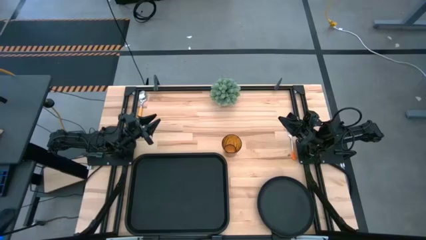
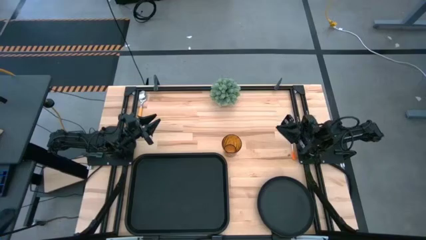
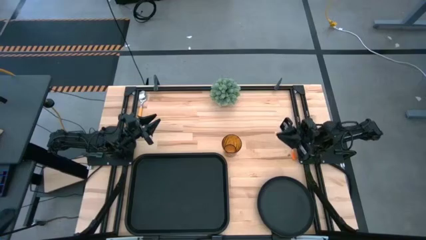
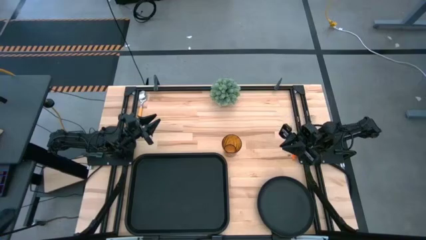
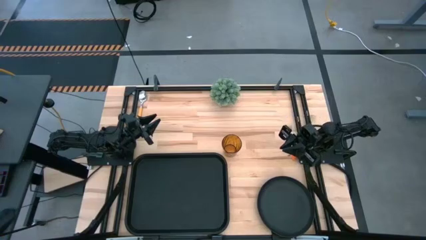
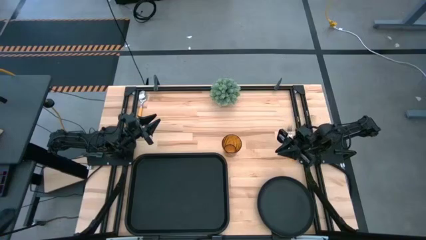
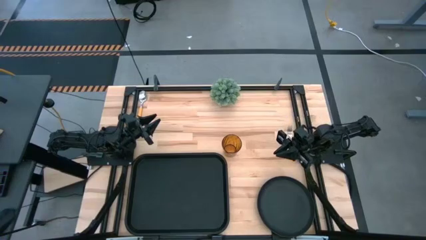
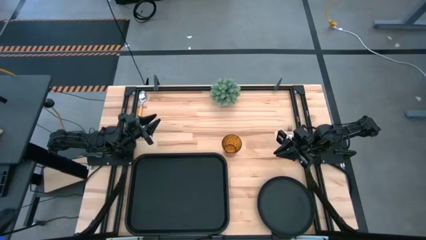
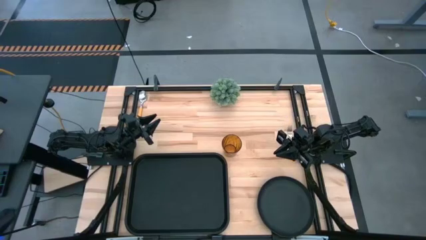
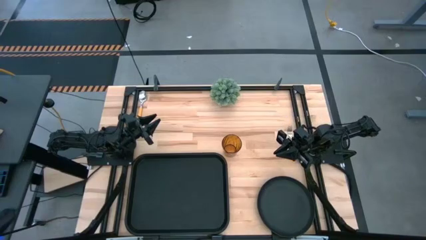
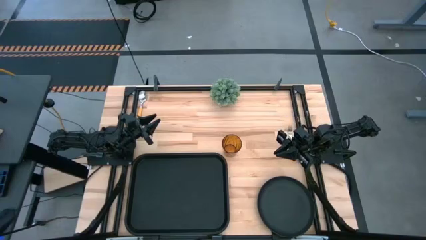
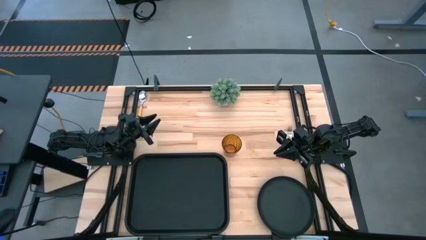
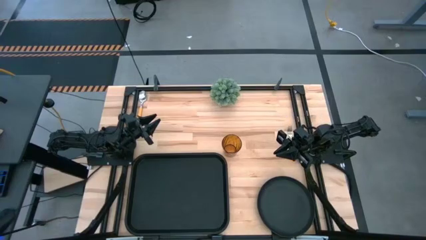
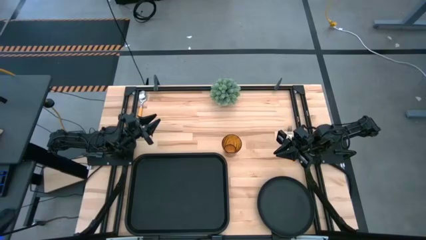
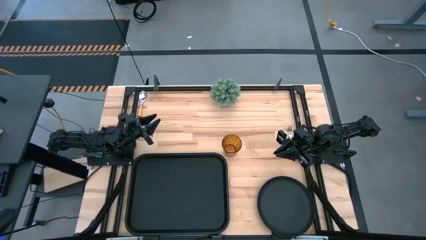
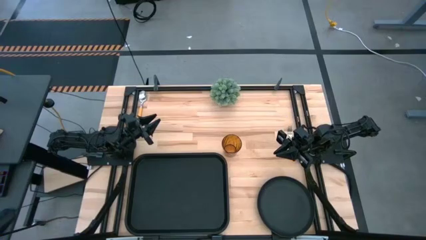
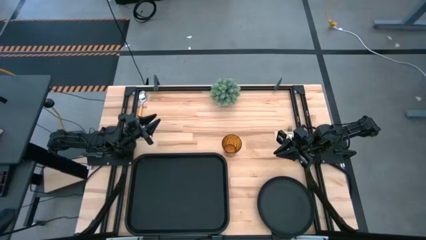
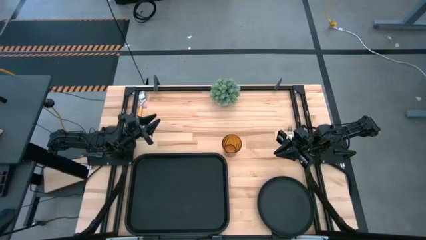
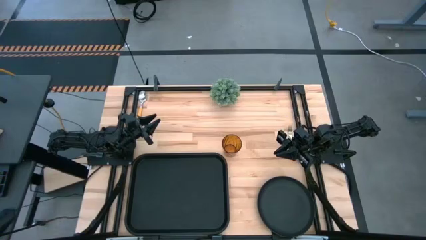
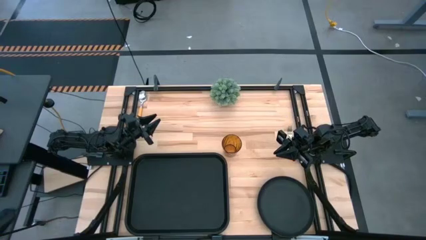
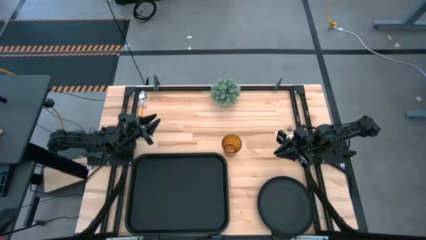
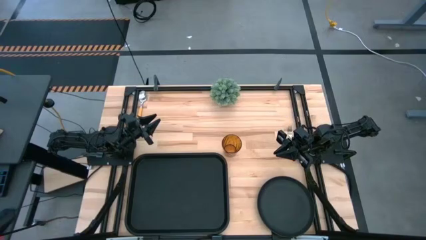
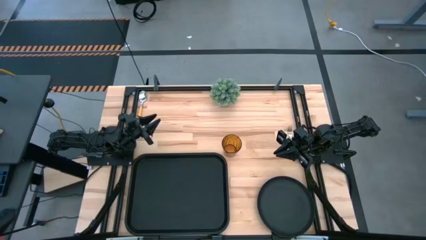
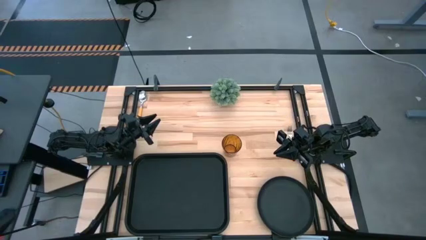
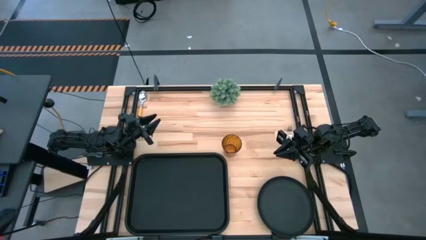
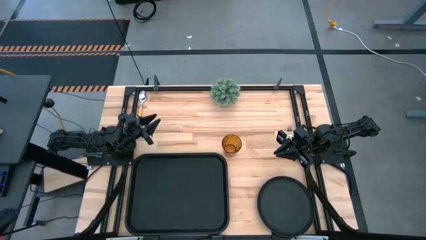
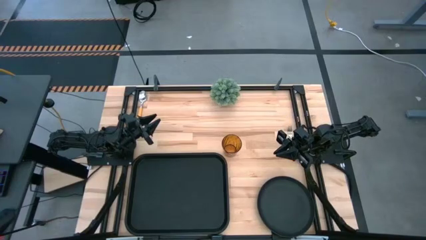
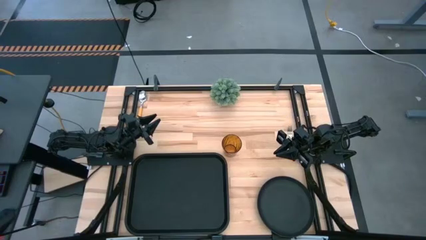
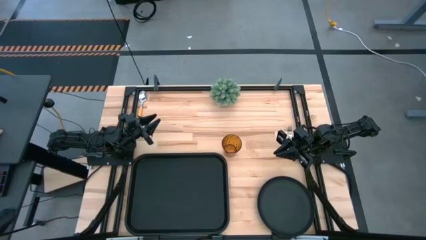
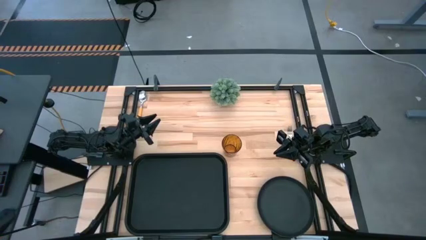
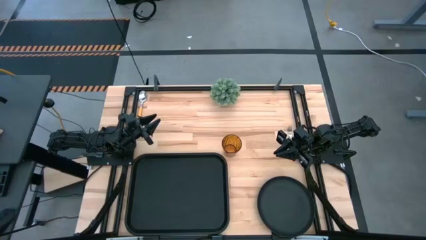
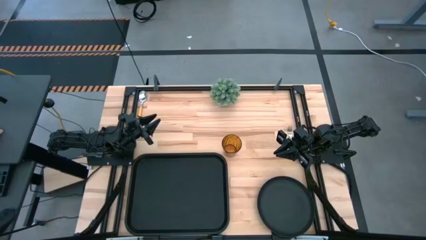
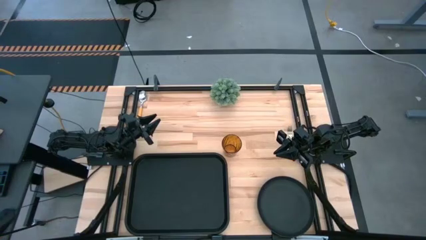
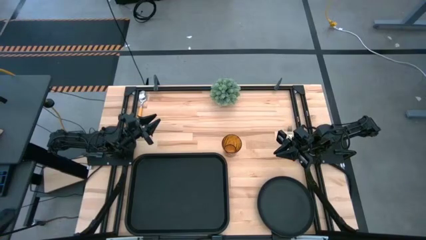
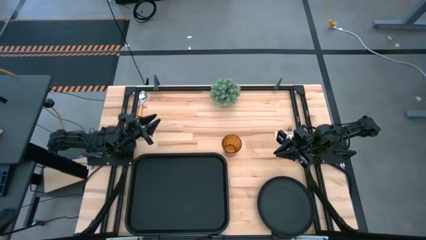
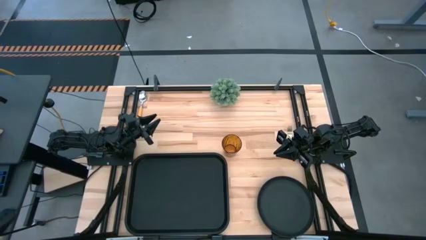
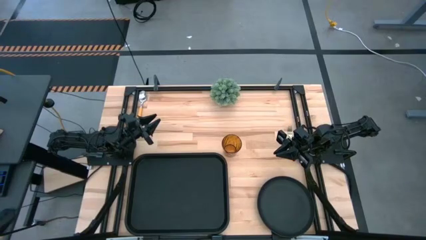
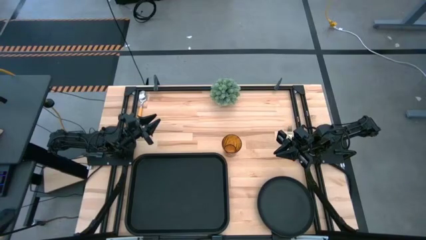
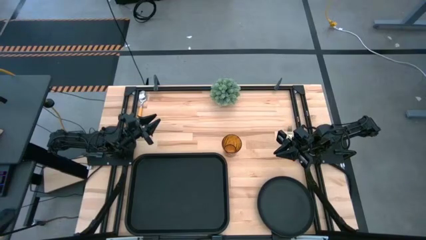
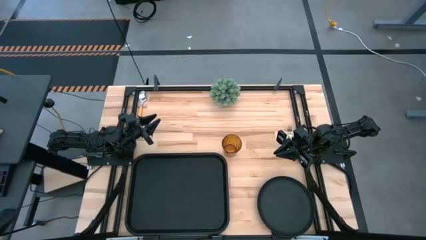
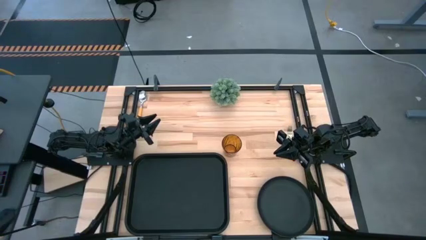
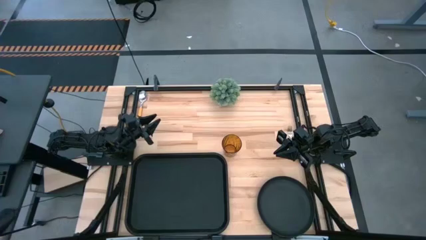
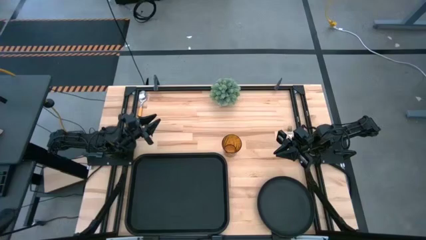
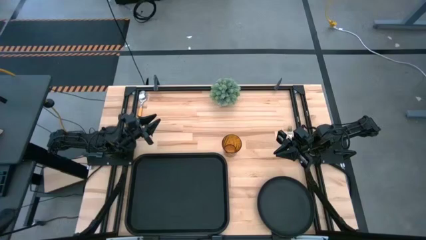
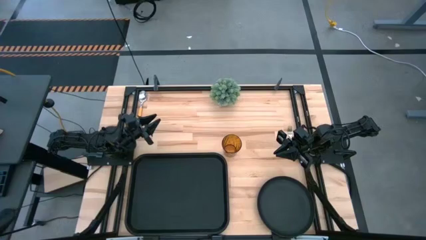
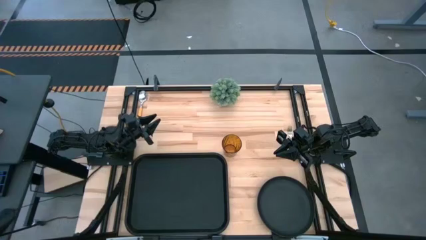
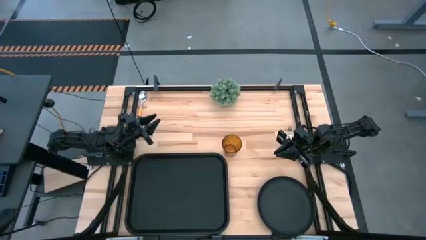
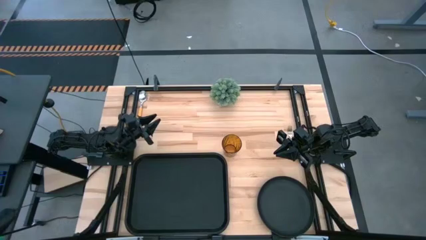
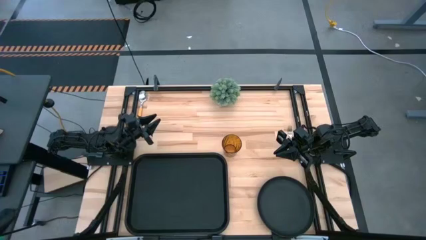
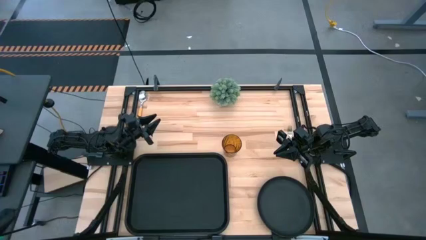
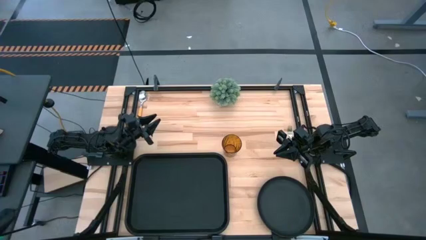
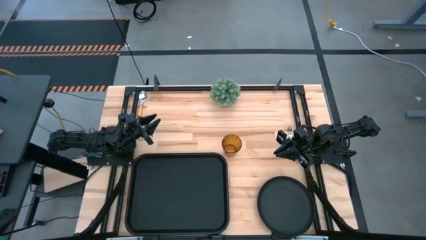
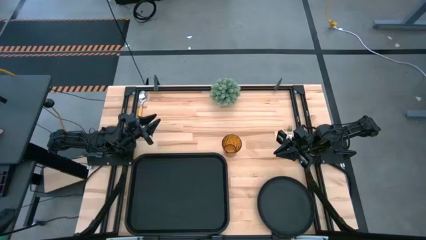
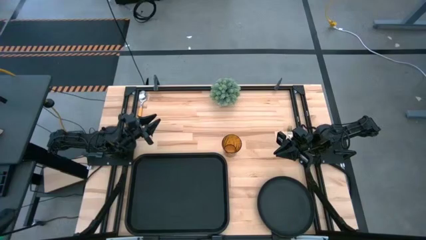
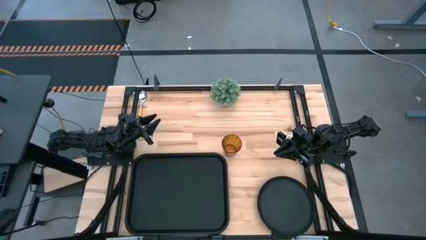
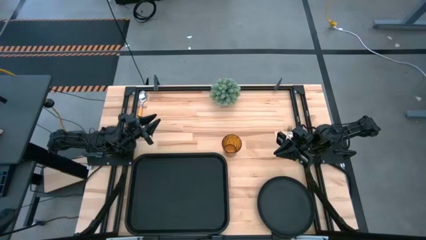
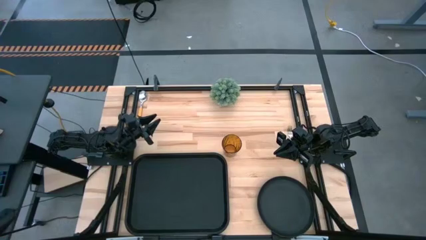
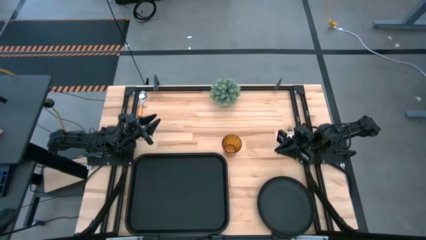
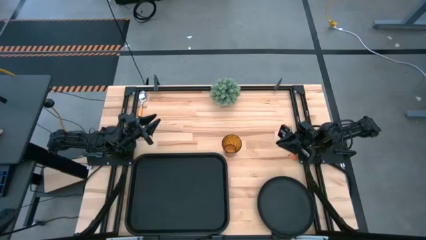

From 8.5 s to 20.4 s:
Task: Pick and place plate/cup/fork/spoon on tray
Put the brown cup on the black serving tray
